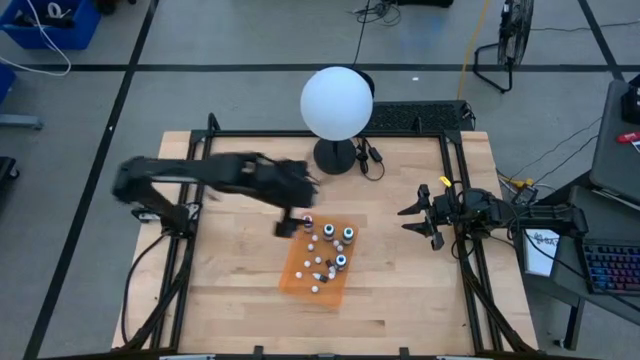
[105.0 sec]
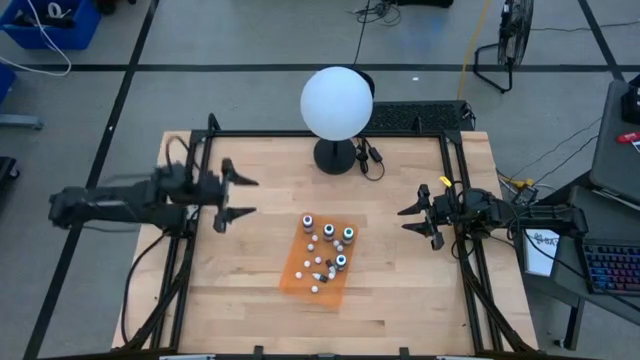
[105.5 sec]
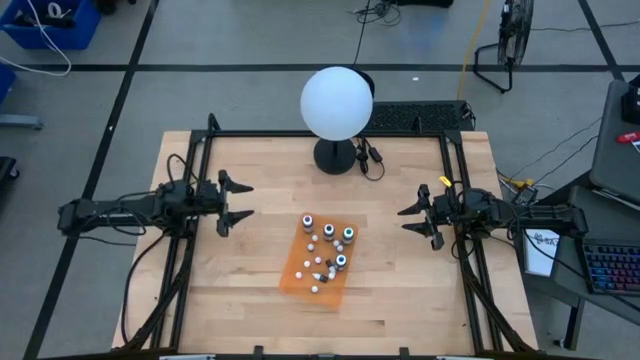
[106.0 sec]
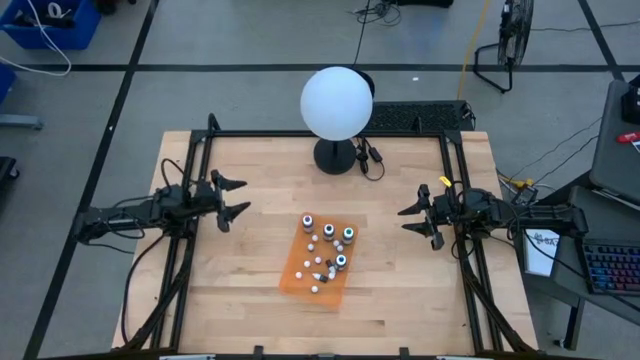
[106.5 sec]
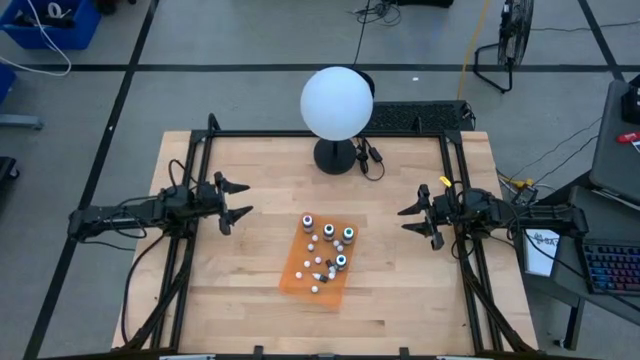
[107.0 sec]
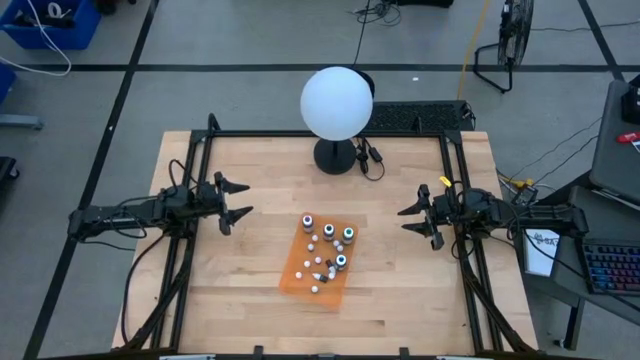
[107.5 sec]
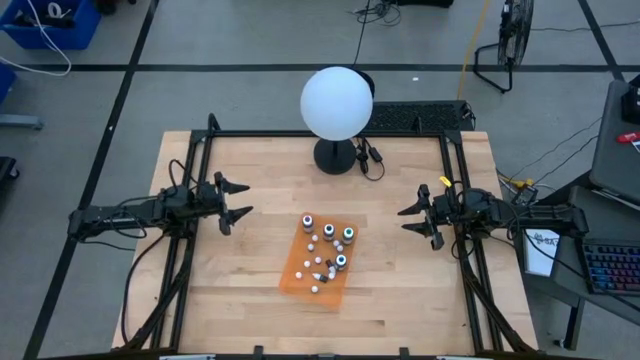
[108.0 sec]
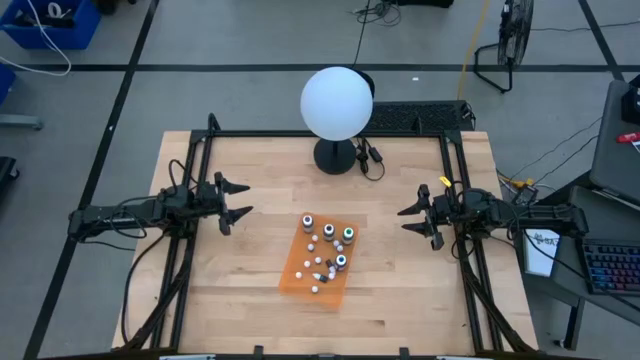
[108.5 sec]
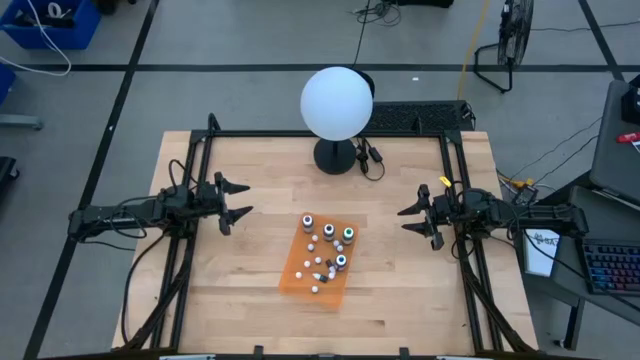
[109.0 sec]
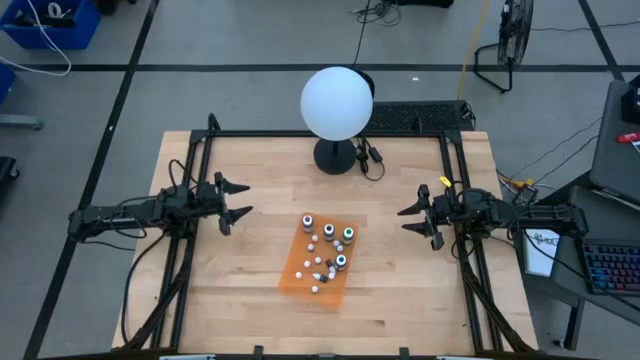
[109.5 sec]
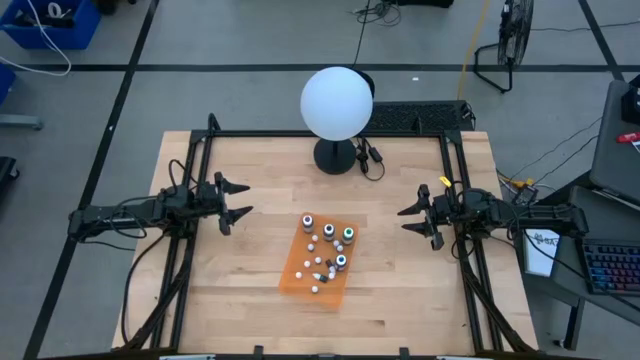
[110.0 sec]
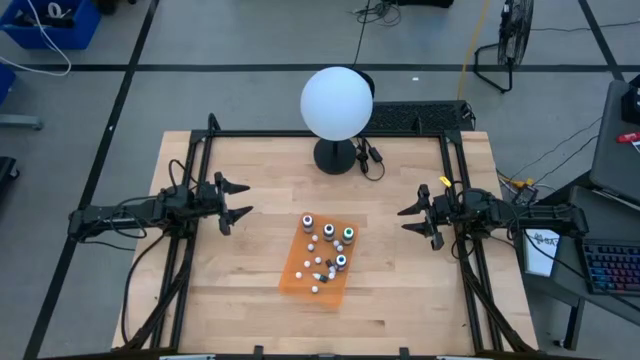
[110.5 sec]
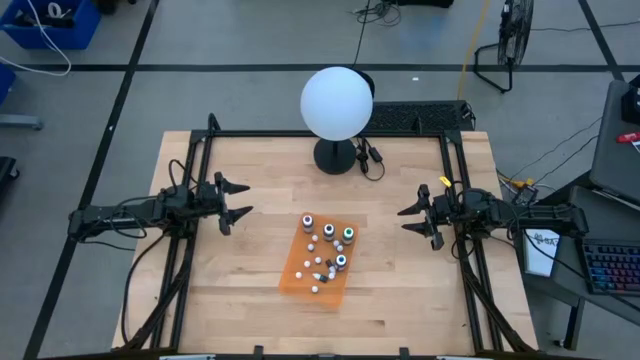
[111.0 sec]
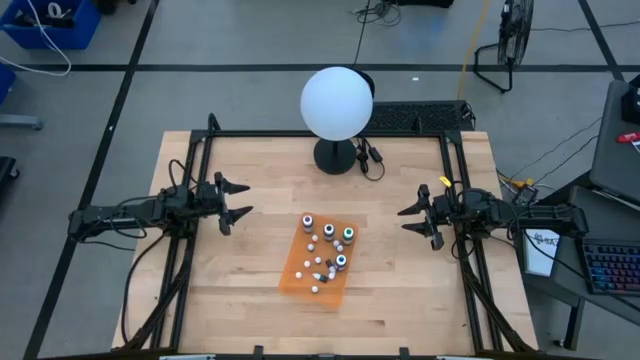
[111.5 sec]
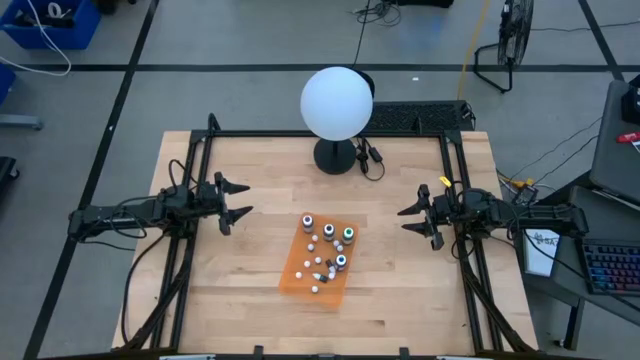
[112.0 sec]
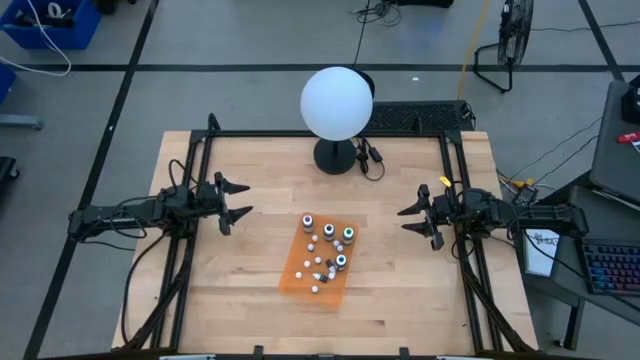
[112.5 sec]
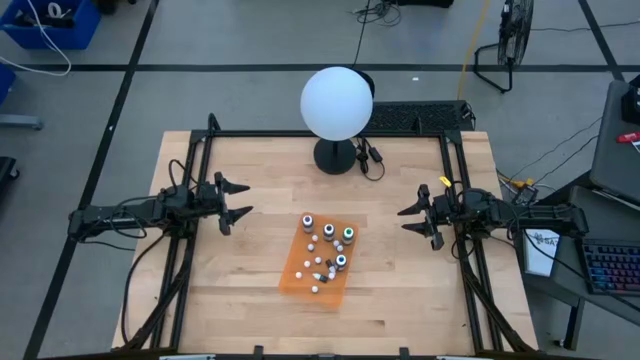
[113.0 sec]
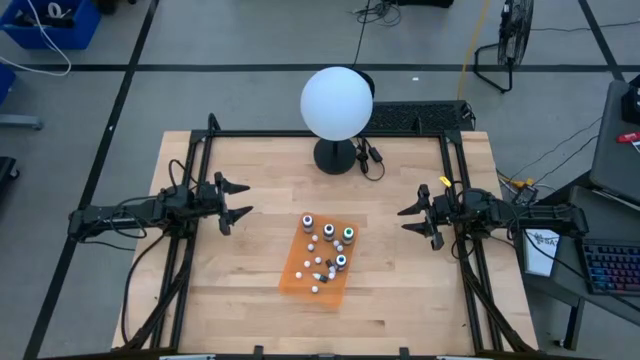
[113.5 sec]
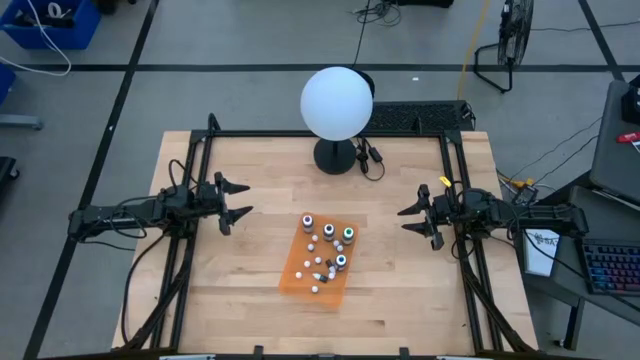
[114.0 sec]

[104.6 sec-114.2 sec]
Task: Pick & Place food coloring
Return to Home Position

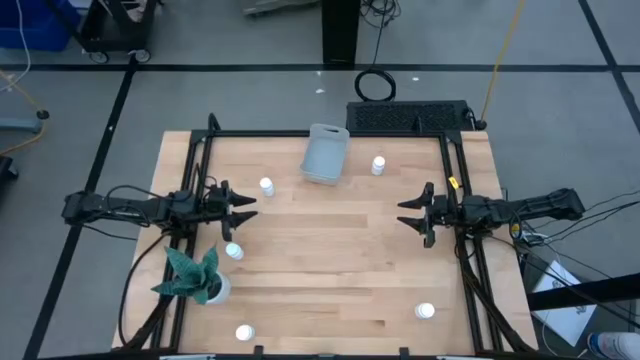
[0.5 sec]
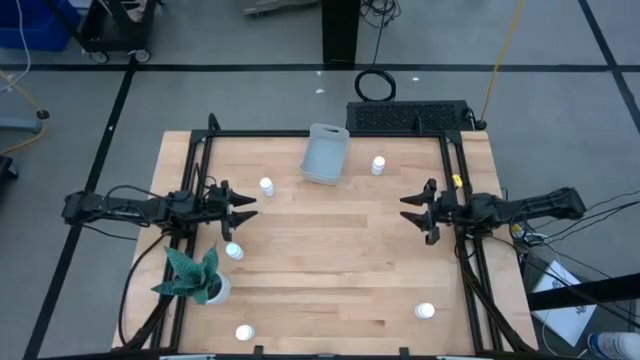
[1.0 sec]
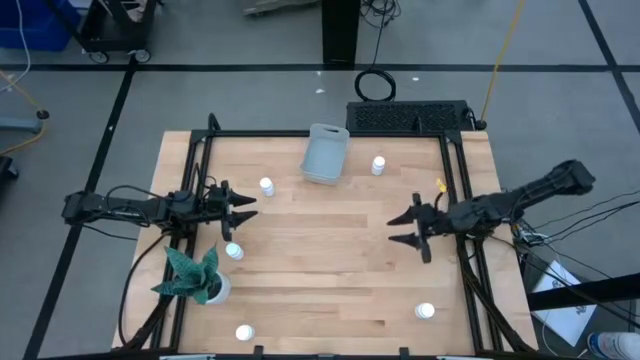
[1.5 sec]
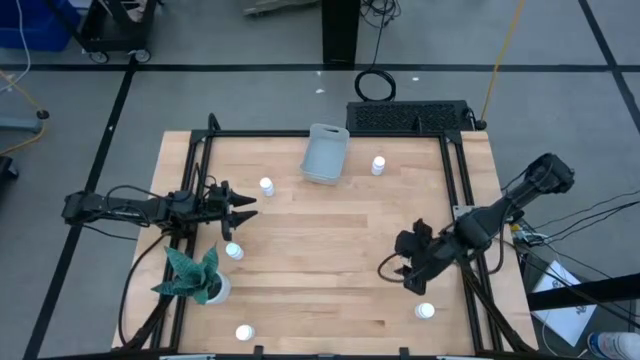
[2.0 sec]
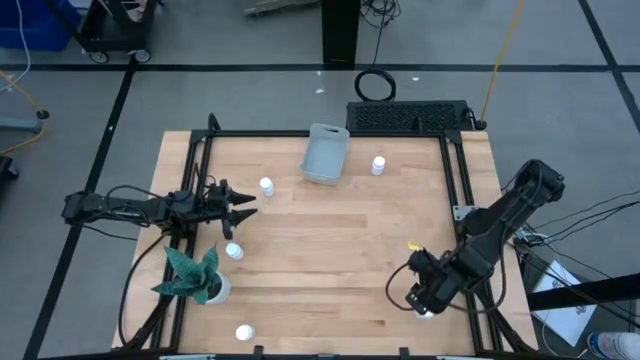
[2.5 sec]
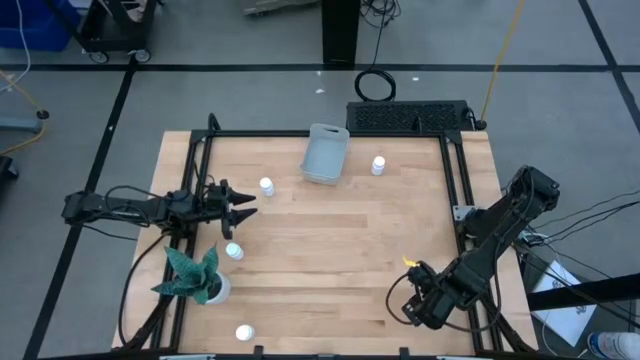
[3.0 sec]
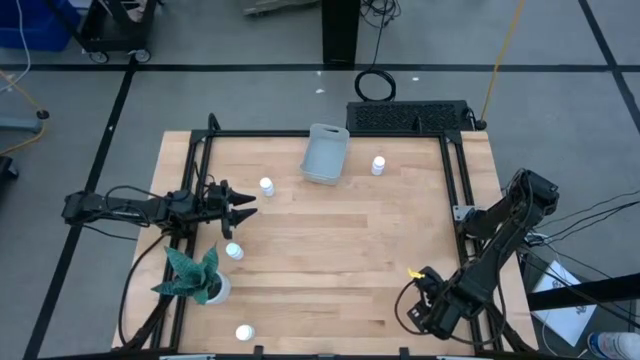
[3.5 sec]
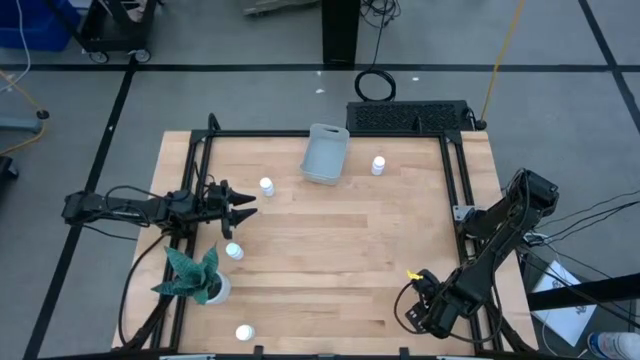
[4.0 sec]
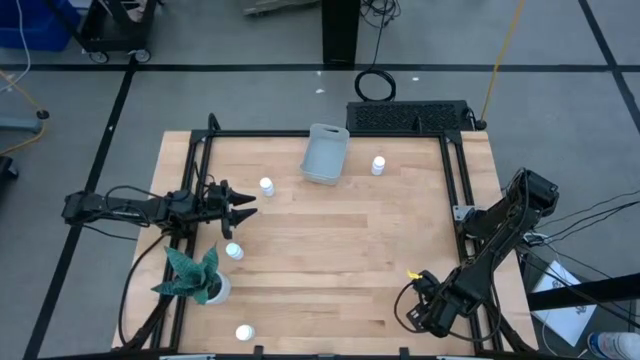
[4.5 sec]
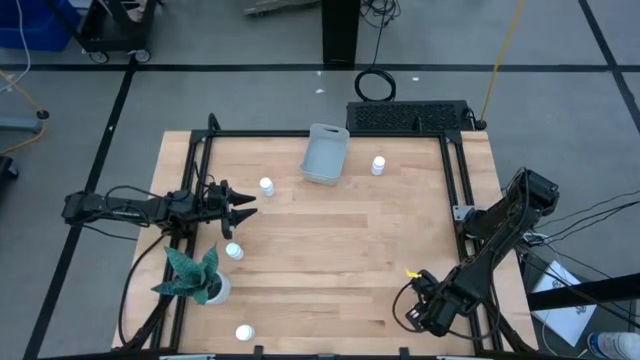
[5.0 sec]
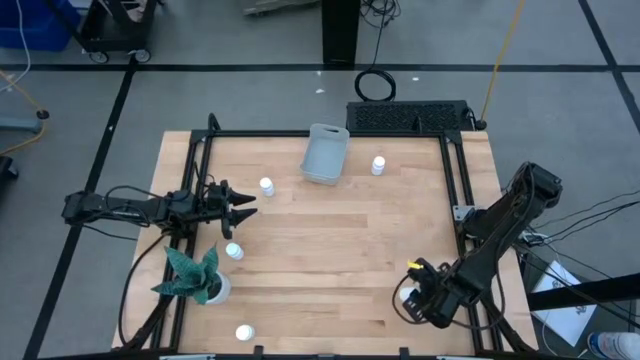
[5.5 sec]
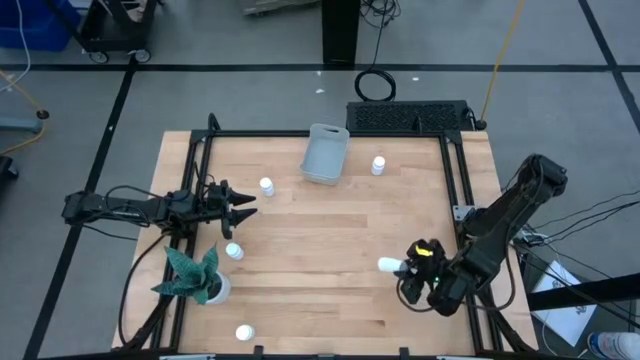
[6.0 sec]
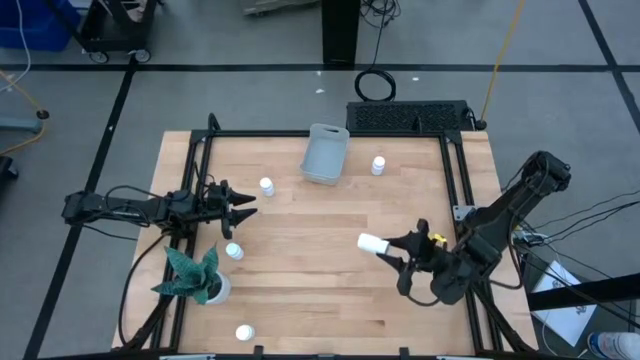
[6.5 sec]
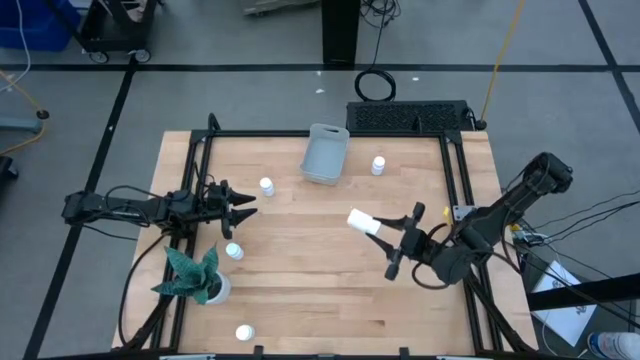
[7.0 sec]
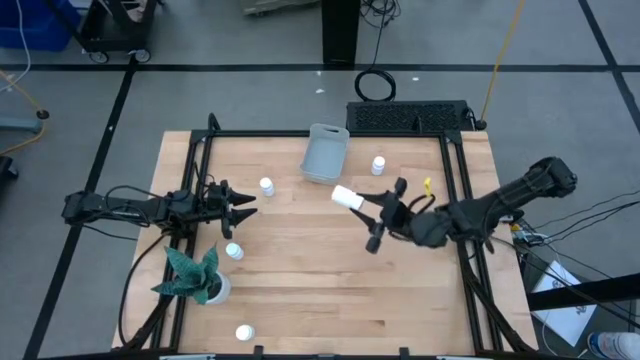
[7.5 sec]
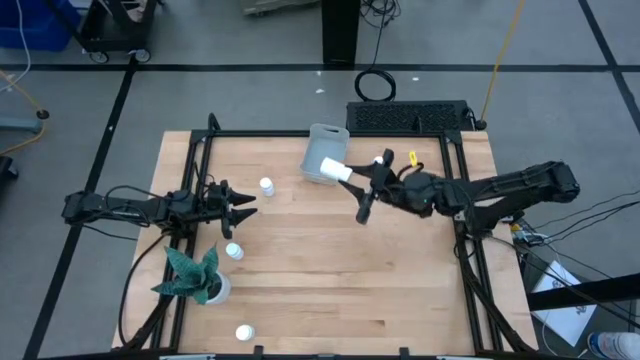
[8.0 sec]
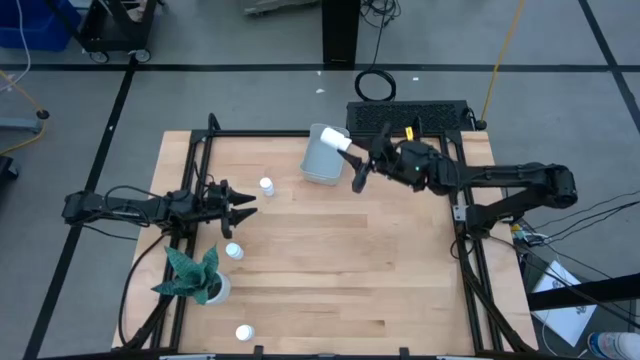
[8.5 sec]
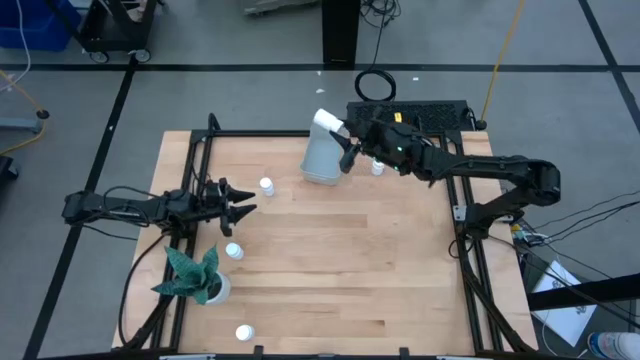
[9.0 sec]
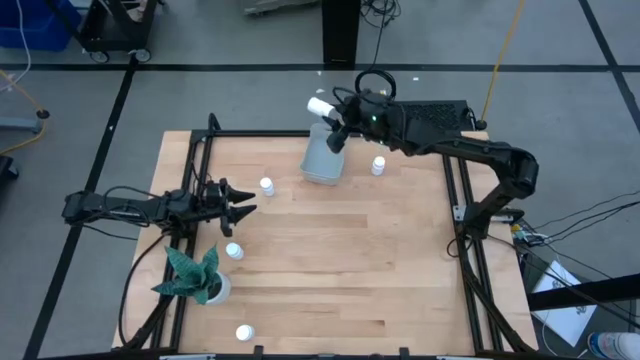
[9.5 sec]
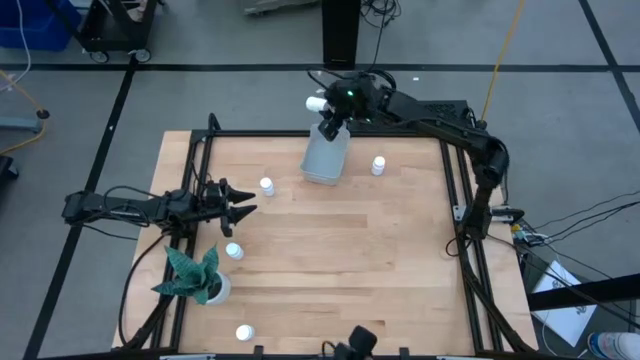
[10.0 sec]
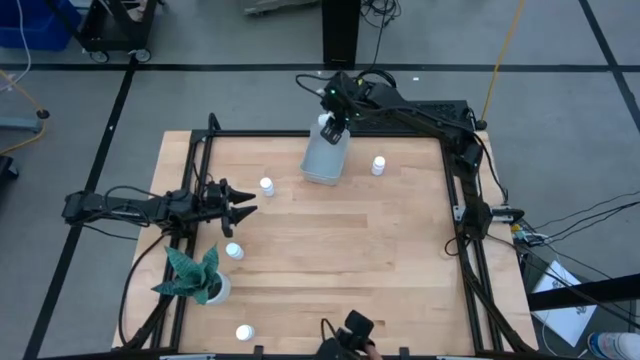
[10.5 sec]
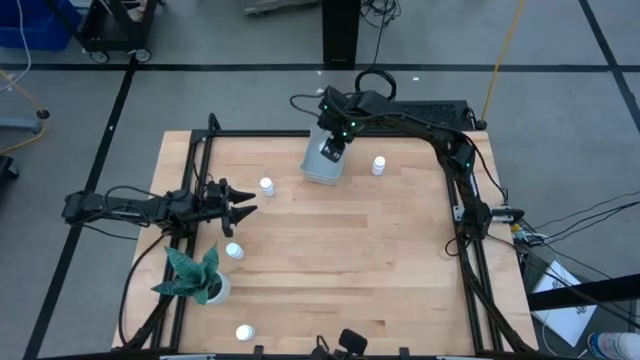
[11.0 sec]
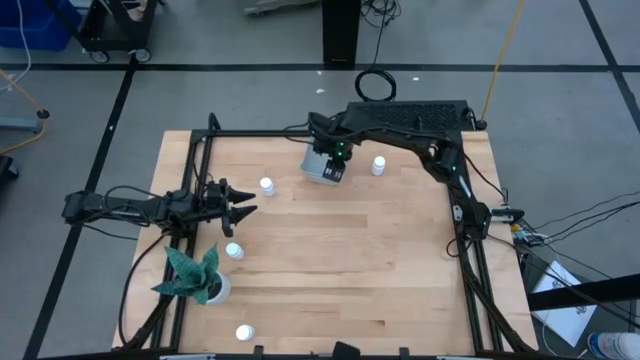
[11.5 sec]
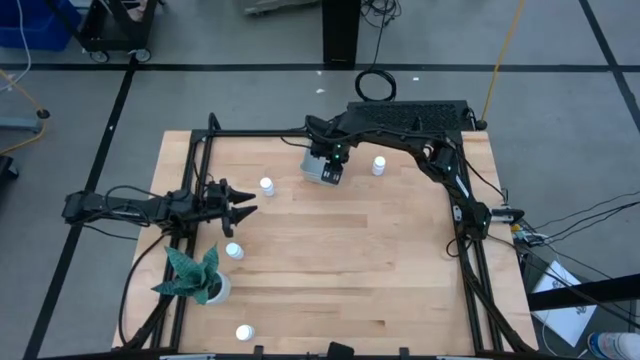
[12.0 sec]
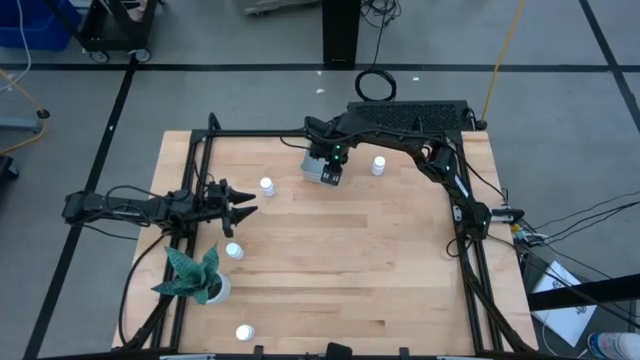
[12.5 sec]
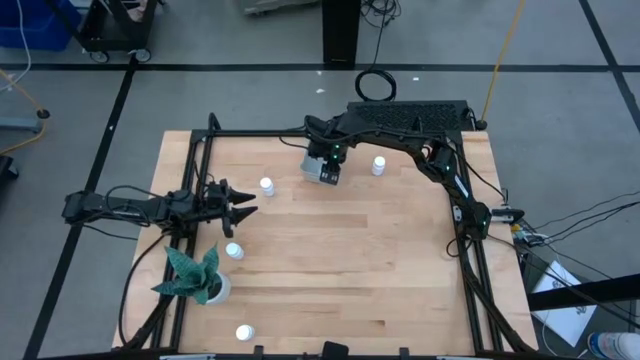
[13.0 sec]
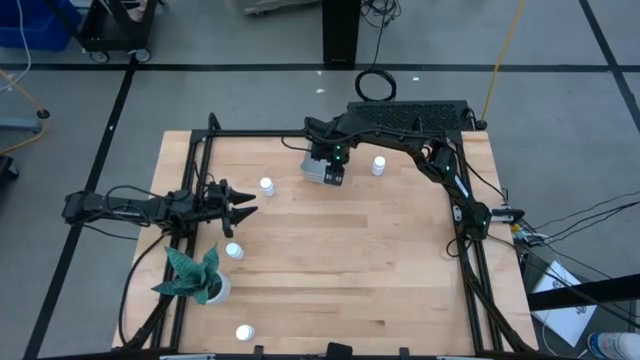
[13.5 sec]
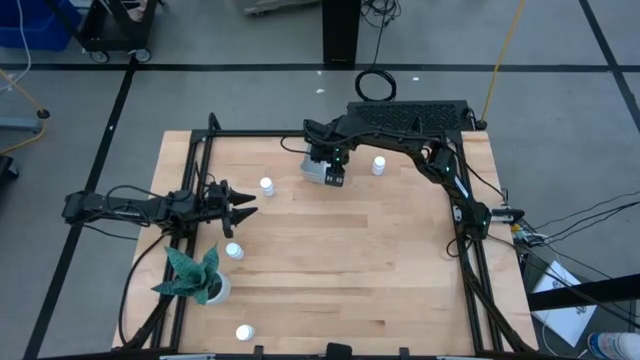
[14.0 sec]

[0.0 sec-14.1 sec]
Task: Pick and place pill bottles into a basket
Put the white medicine bottle into the gray bin
